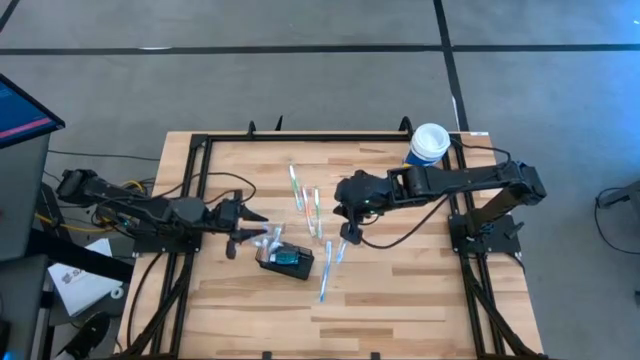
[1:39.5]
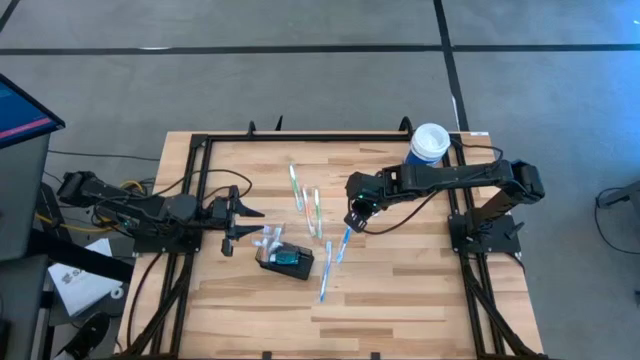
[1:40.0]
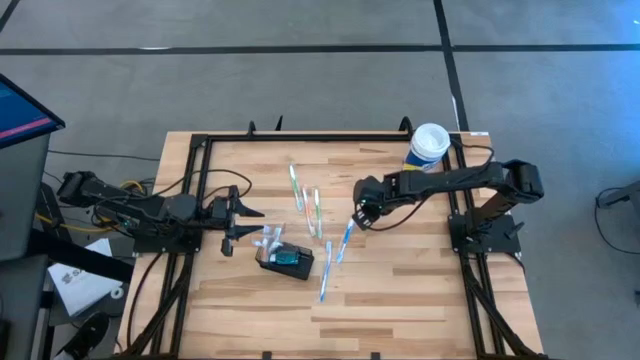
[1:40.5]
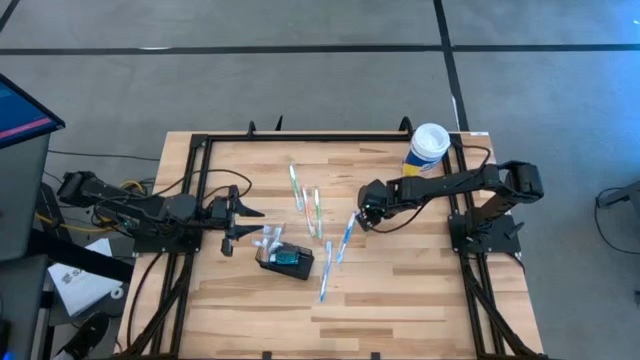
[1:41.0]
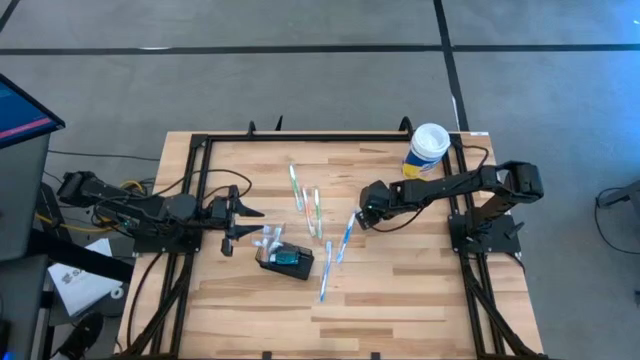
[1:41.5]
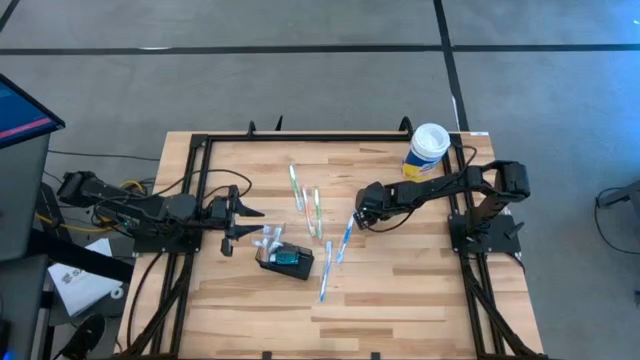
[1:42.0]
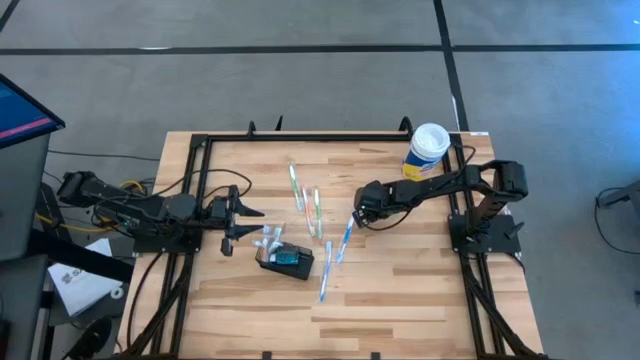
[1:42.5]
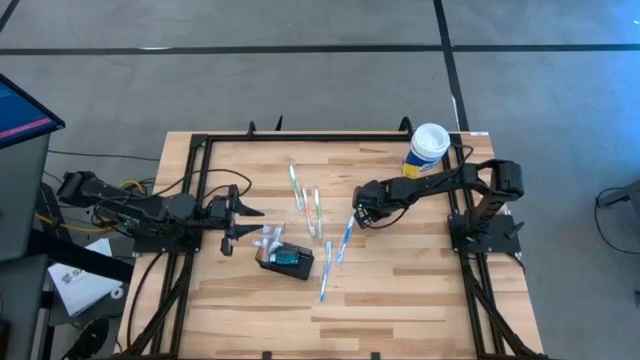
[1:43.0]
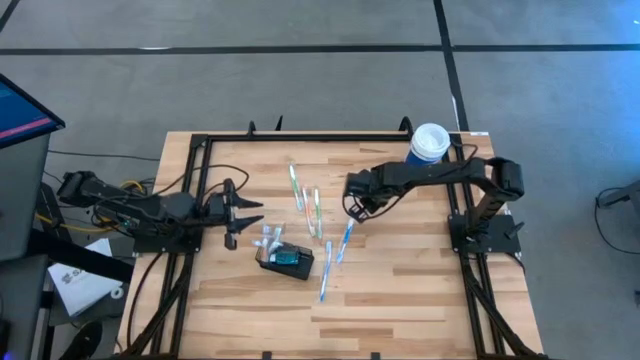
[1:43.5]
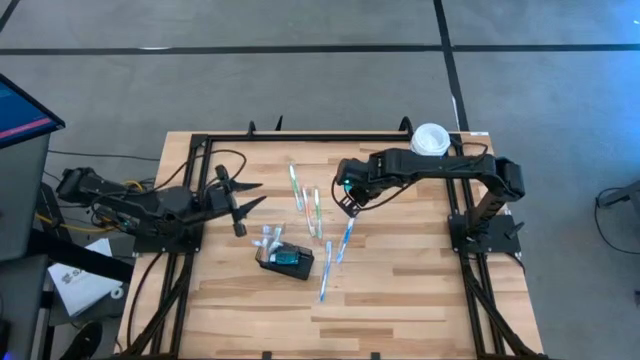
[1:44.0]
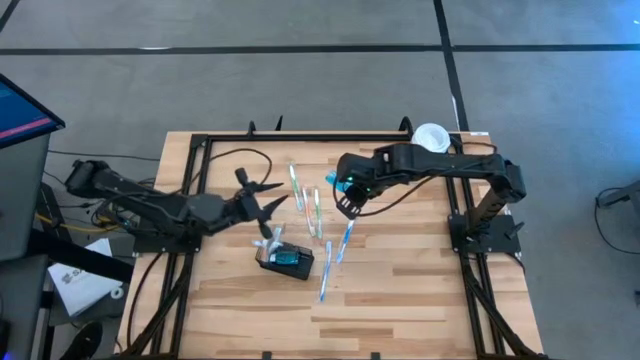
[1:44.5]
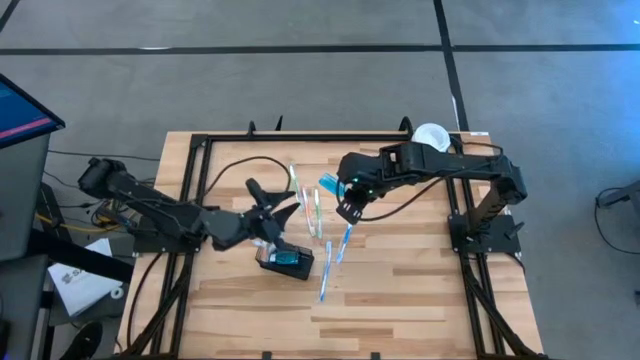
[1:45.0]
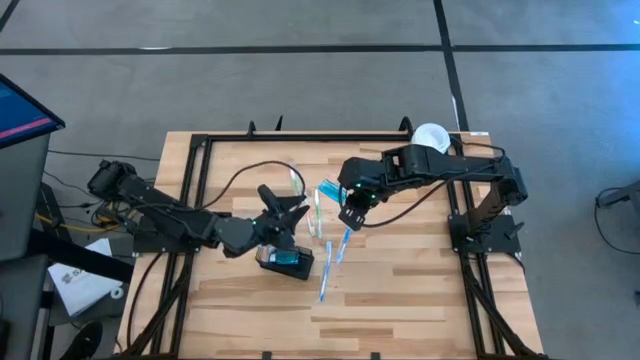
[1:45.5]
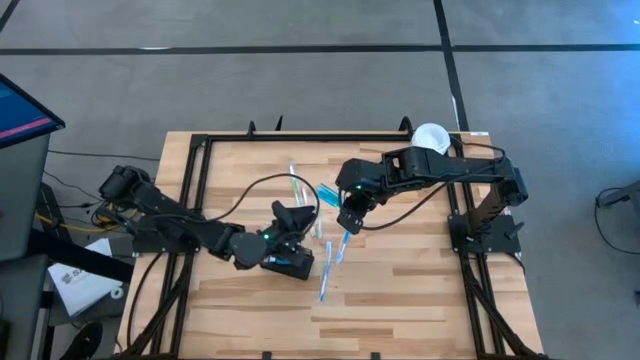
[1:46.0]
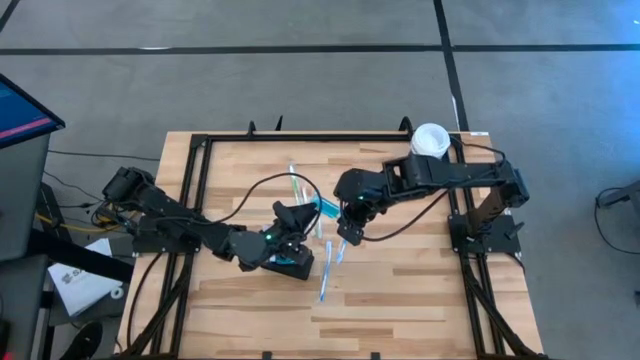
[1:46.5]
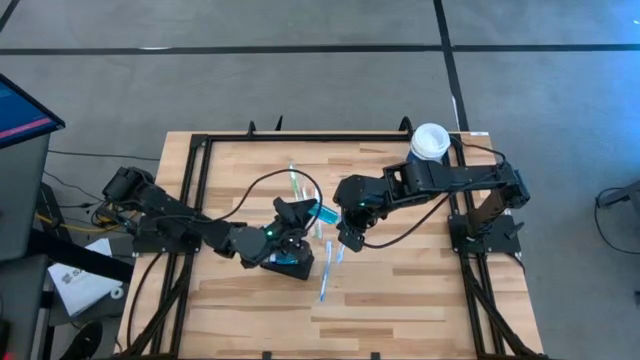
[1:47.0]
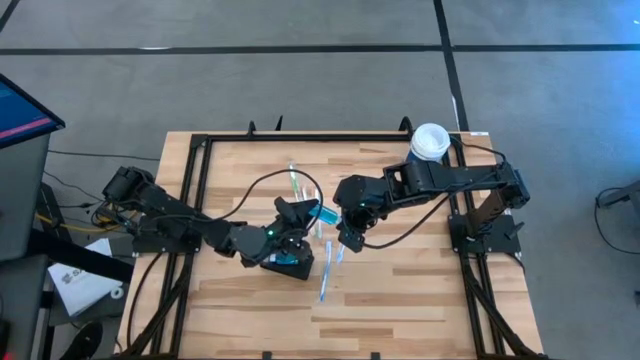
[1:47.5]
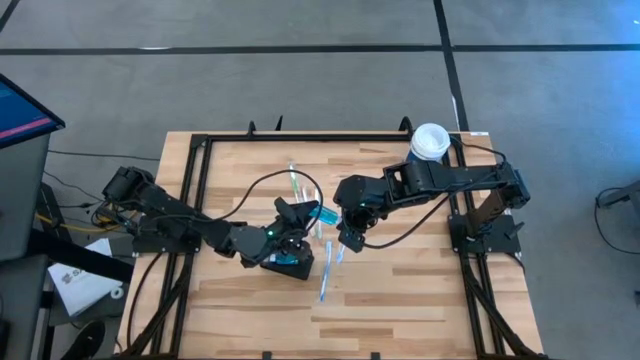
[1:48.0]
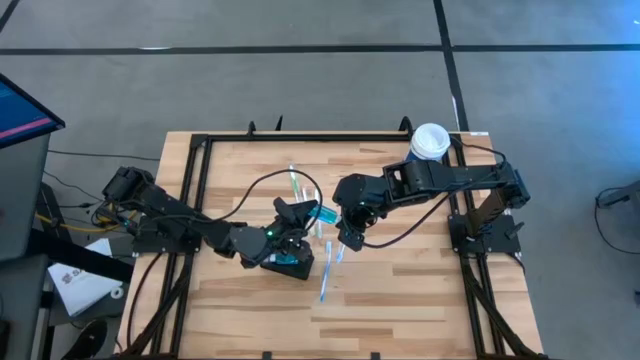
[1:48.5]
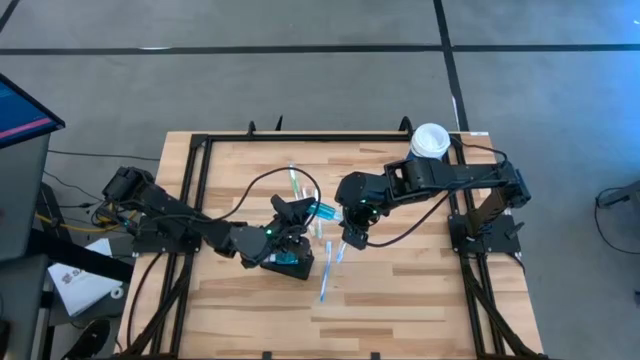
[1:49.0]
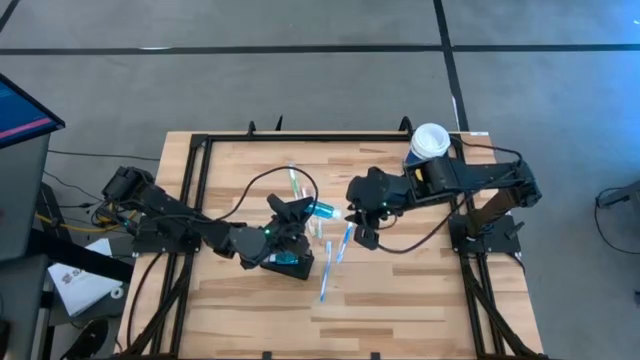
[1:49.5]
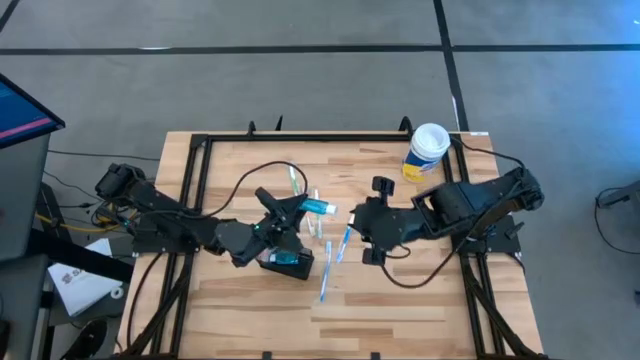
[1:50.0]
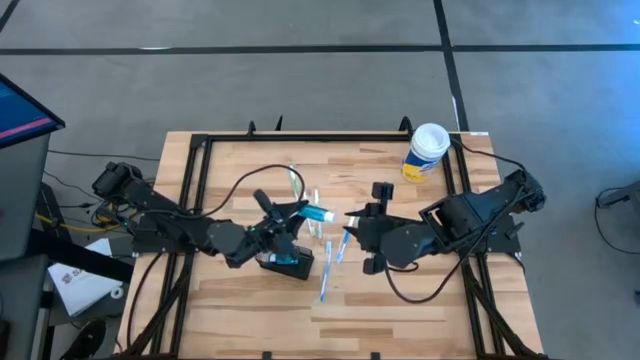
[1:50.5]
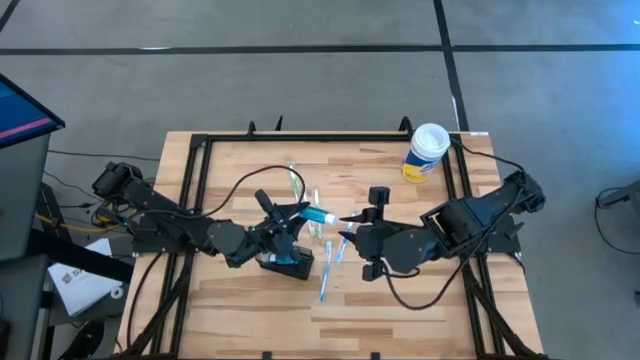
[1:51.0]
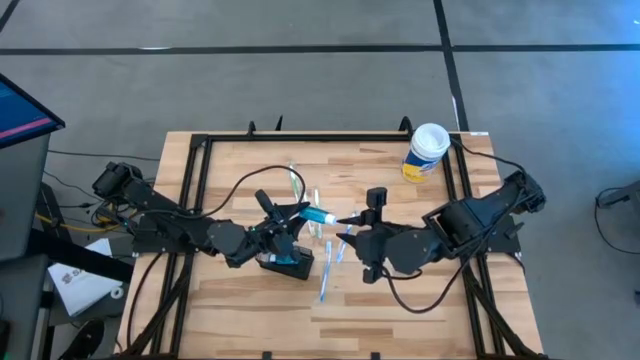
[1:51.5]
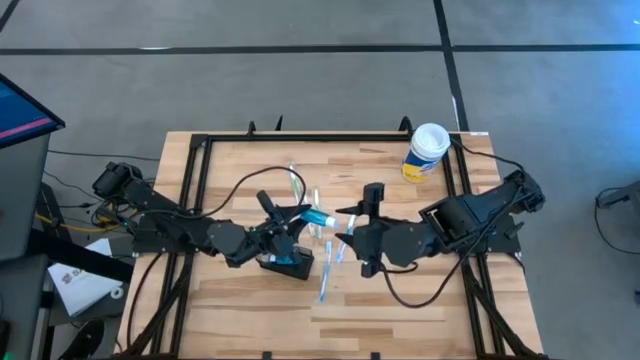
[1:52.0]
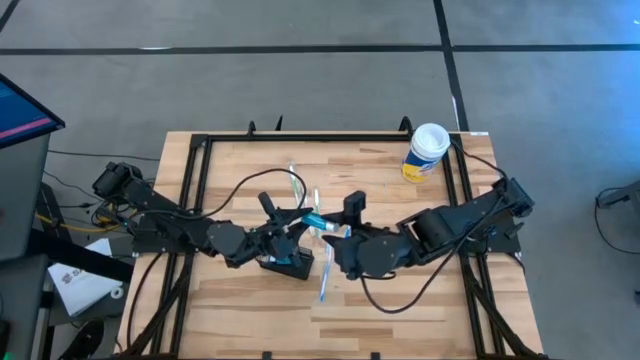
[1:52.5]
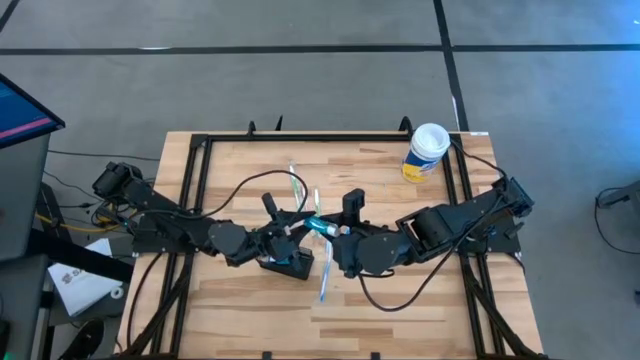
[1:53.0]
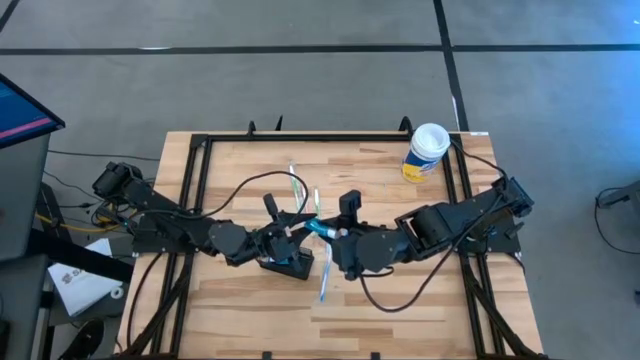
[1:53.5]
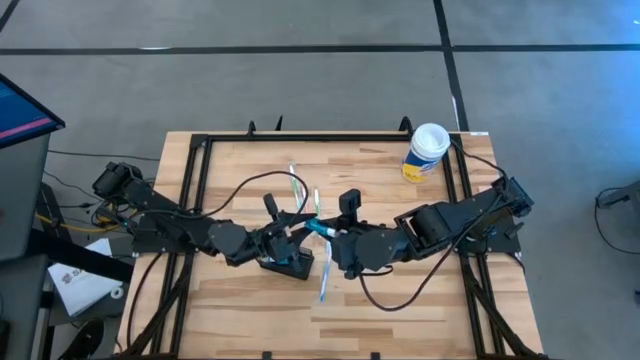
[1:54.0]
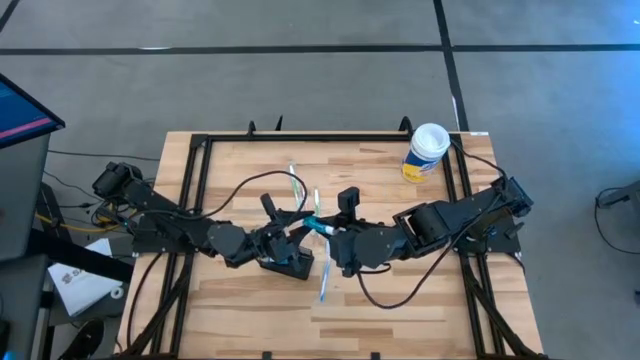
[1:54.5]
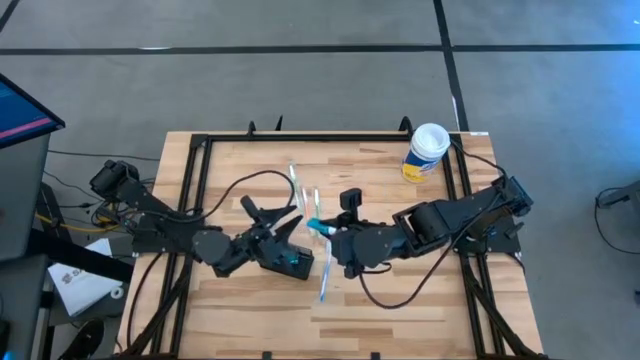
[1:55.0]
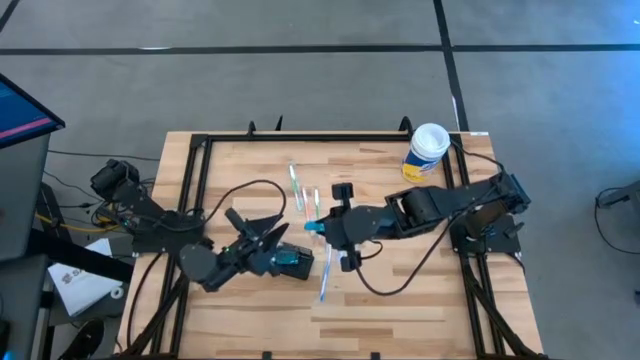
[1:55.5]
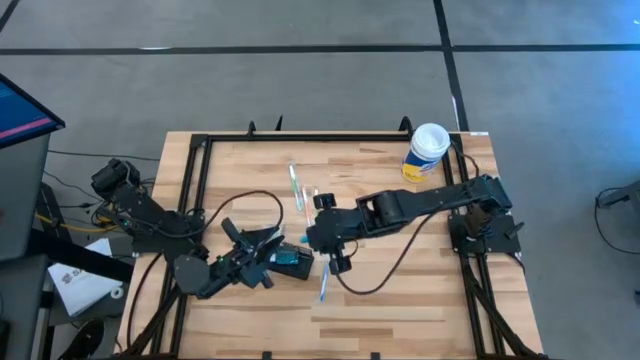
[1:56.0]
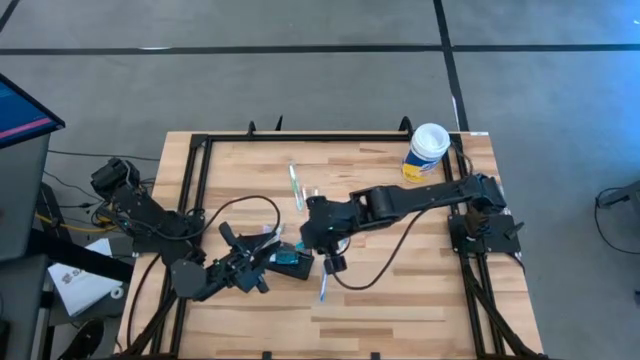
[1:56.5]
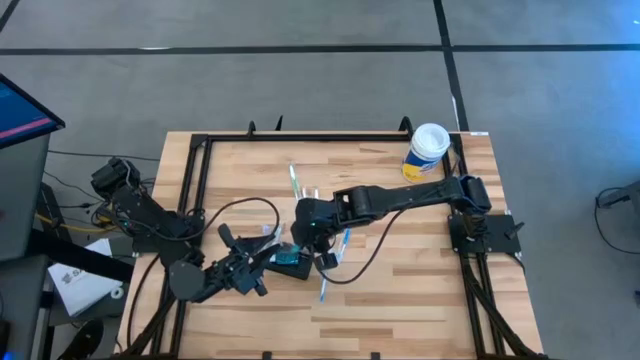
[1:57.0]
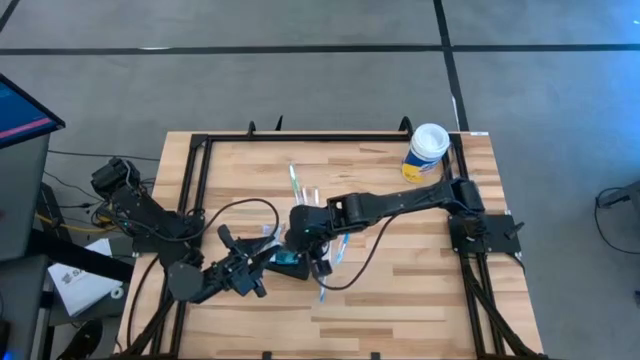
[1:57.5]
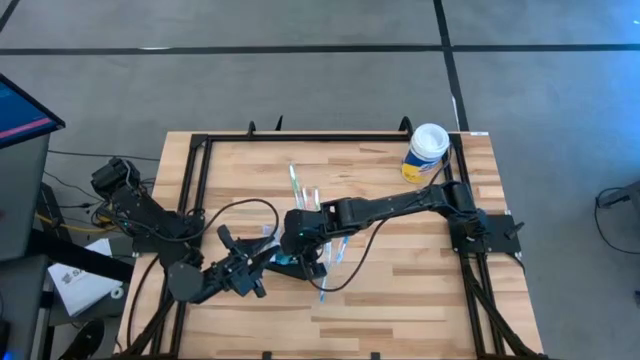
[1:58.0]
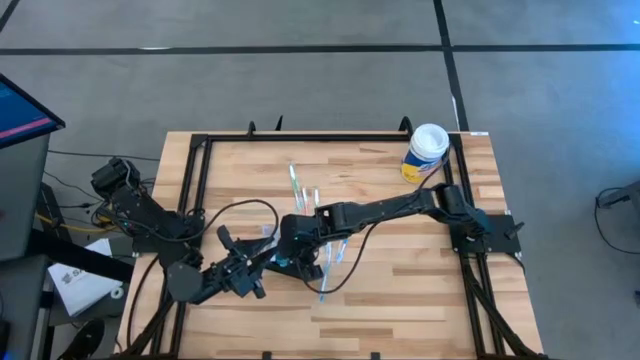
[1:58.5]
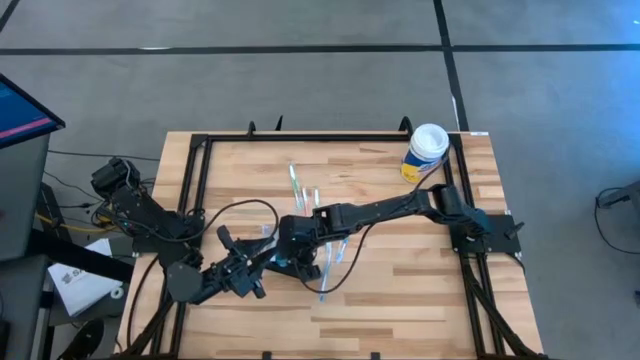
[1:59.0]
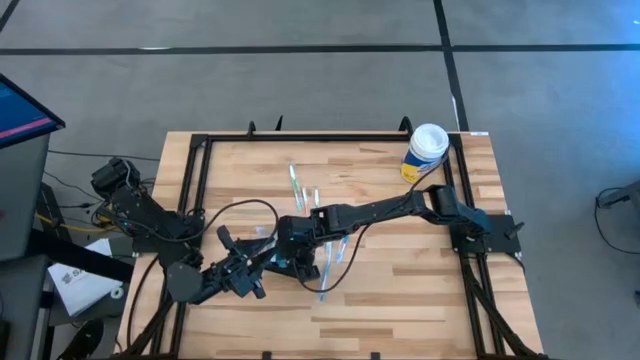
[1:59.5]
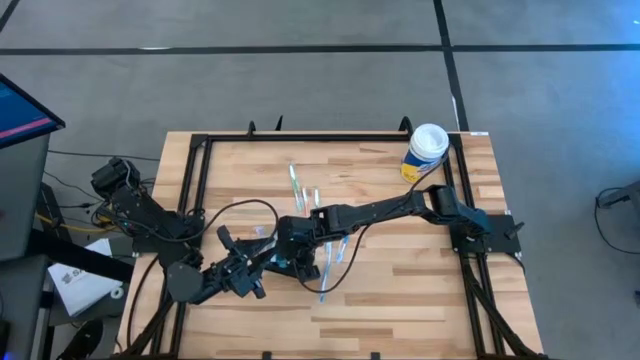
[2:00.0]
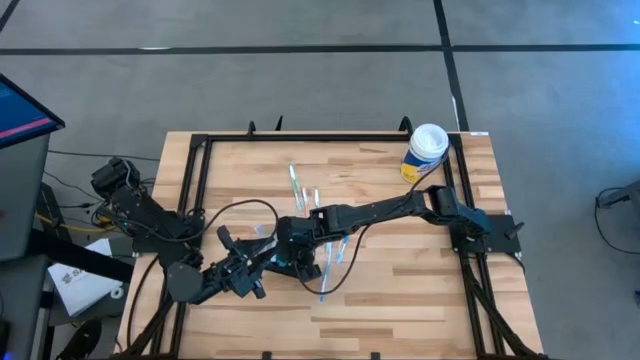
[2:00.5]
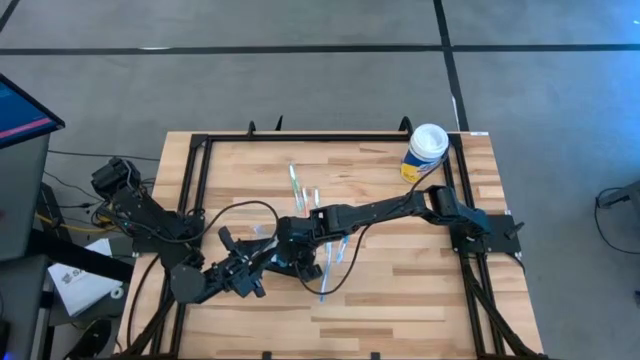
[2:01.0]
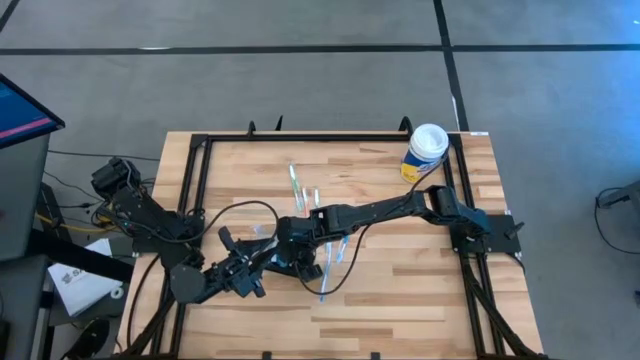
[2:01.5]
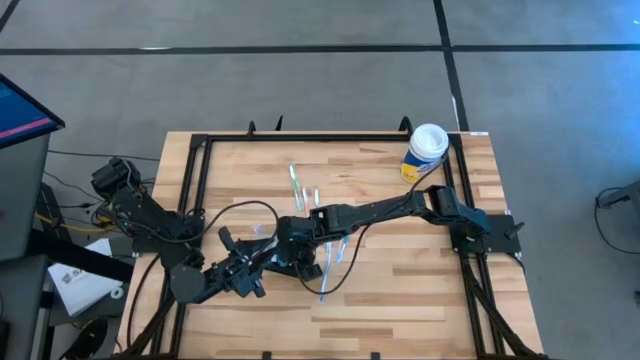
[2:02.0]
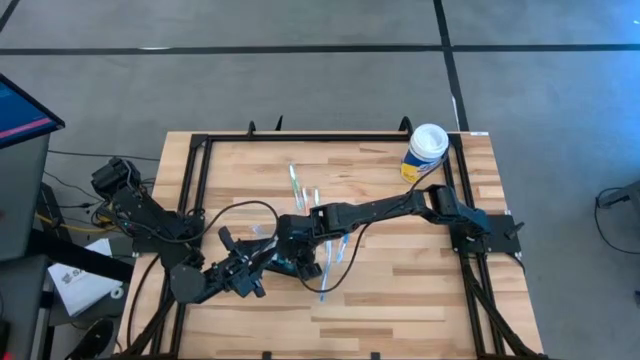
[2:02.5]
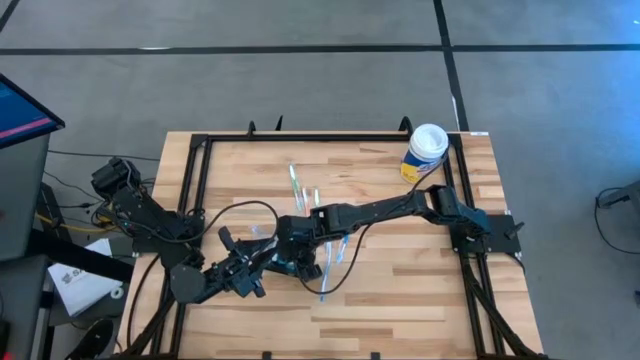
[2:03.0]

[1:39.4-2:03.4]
Task: Pick & Place toothbrushing station
Put the blue mouthwash into the wire organizer
